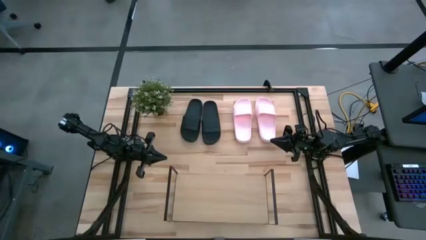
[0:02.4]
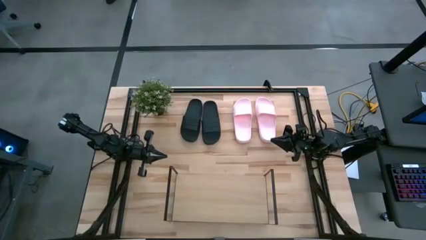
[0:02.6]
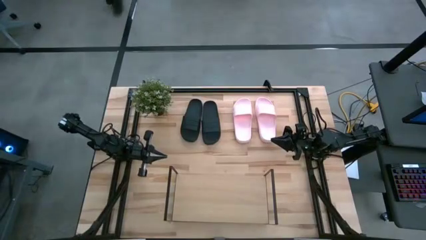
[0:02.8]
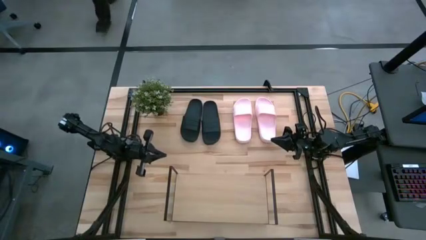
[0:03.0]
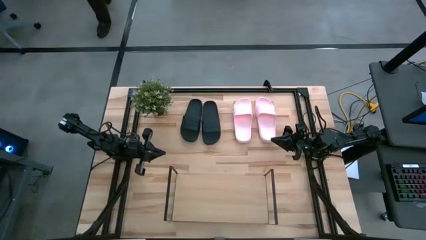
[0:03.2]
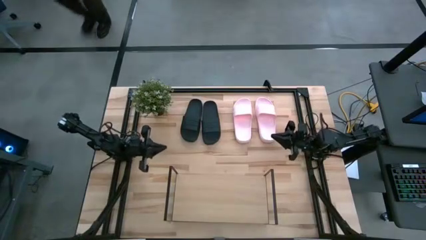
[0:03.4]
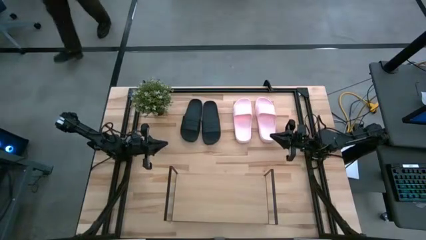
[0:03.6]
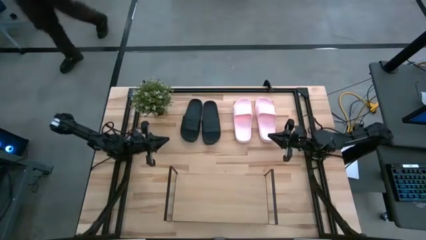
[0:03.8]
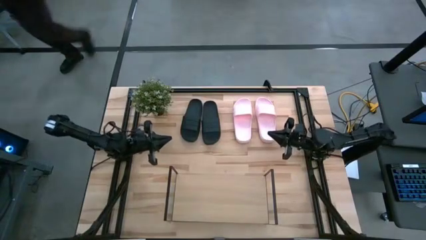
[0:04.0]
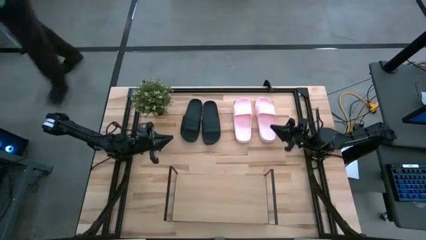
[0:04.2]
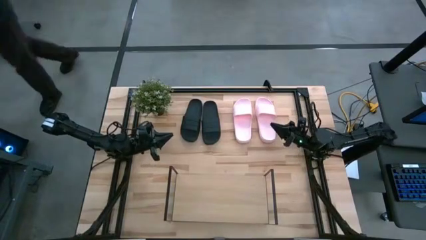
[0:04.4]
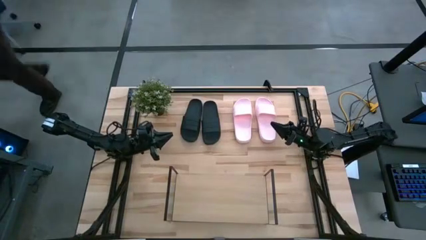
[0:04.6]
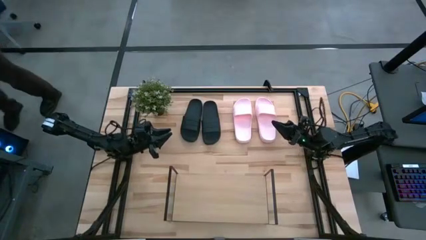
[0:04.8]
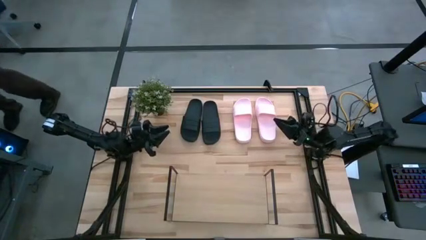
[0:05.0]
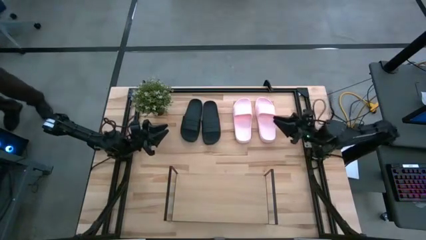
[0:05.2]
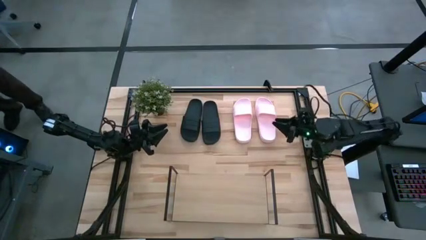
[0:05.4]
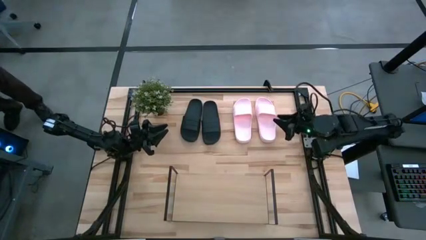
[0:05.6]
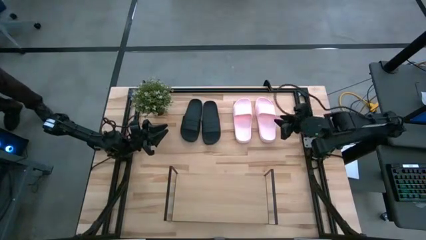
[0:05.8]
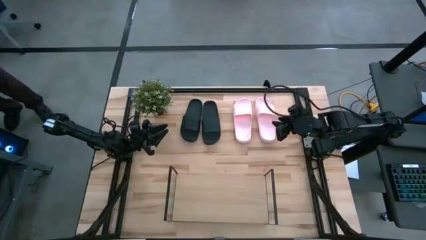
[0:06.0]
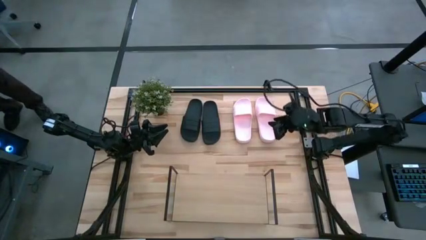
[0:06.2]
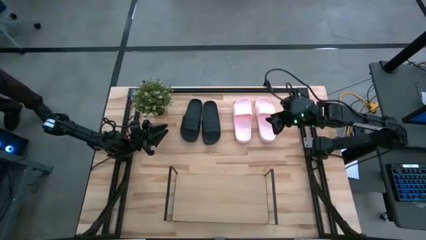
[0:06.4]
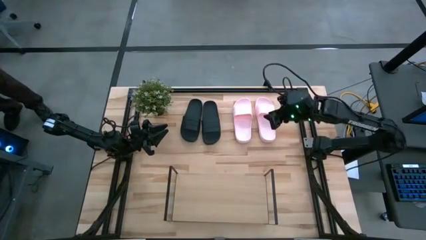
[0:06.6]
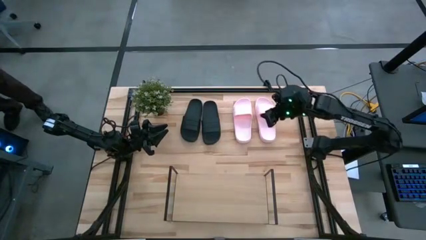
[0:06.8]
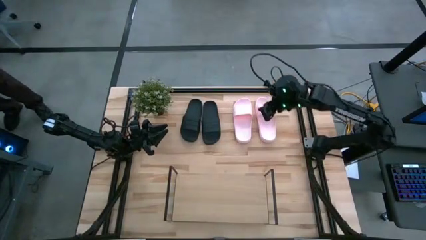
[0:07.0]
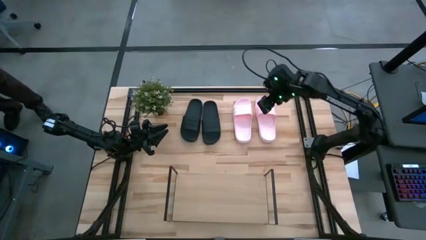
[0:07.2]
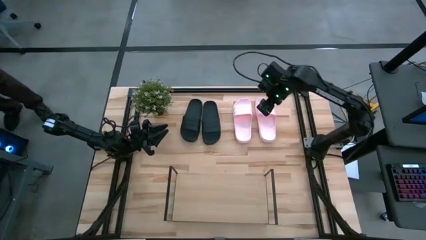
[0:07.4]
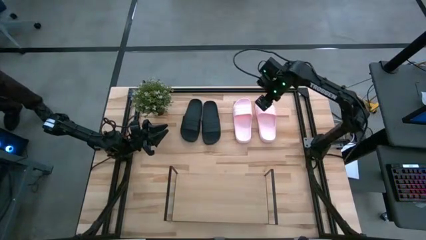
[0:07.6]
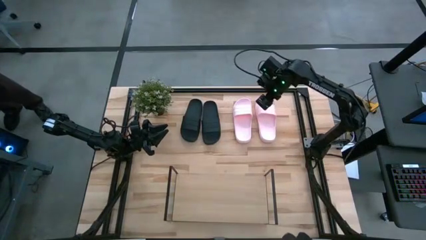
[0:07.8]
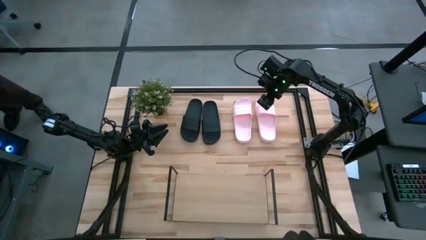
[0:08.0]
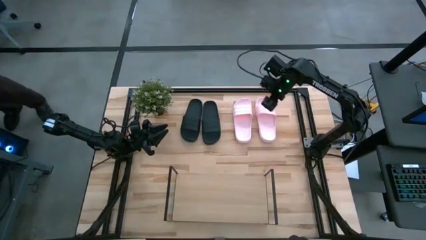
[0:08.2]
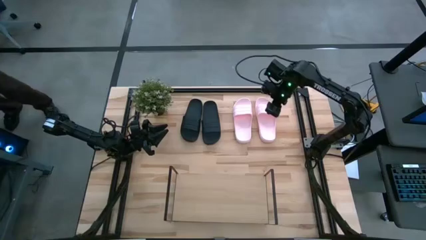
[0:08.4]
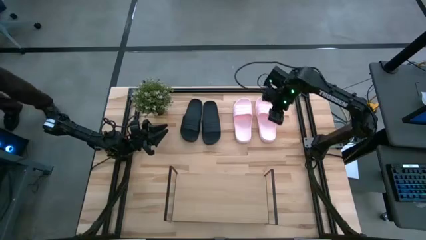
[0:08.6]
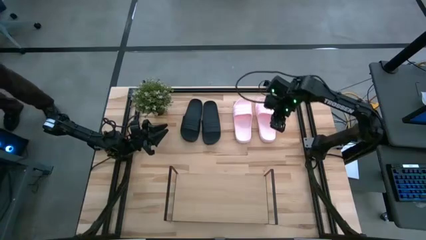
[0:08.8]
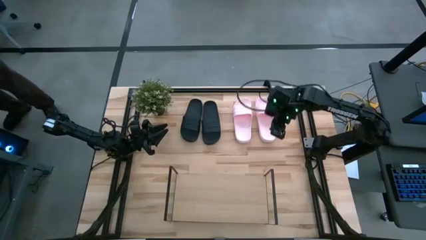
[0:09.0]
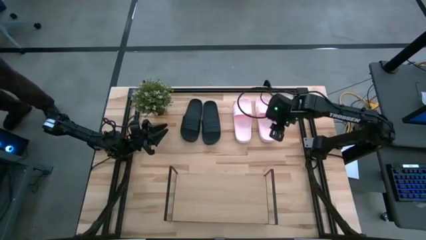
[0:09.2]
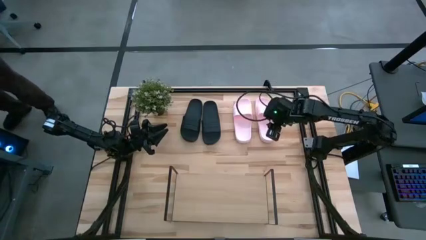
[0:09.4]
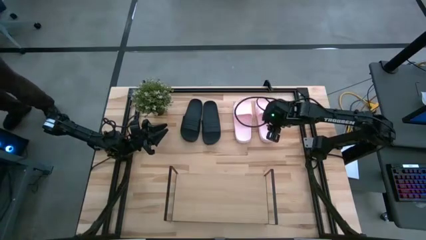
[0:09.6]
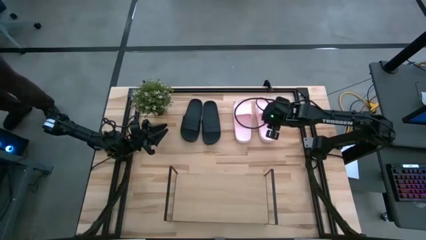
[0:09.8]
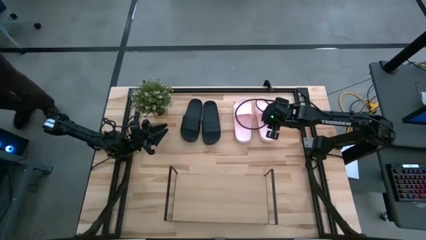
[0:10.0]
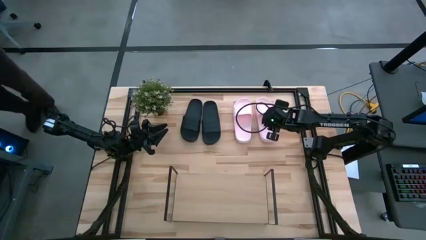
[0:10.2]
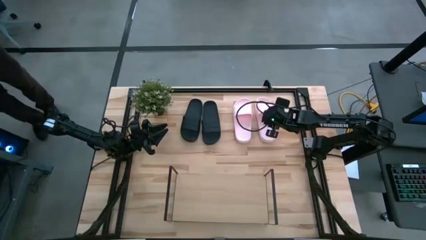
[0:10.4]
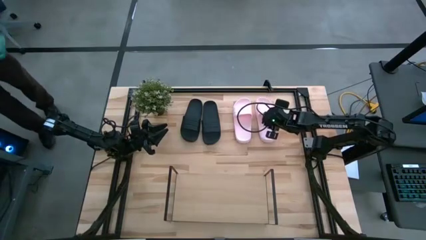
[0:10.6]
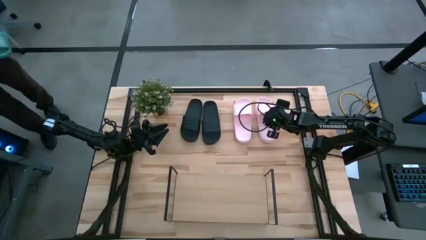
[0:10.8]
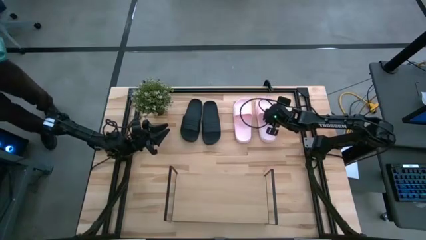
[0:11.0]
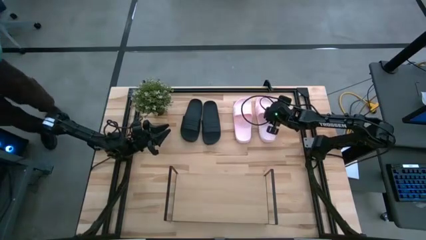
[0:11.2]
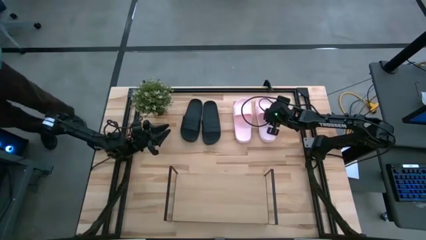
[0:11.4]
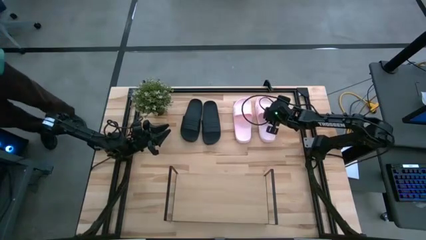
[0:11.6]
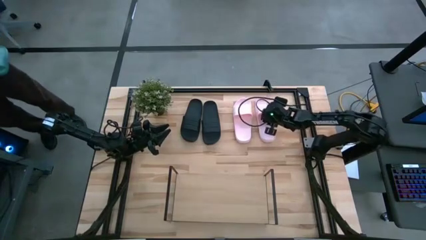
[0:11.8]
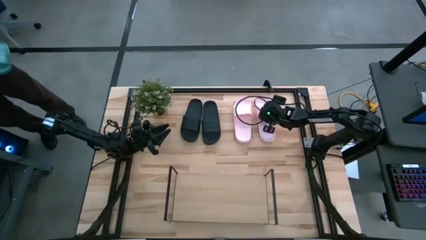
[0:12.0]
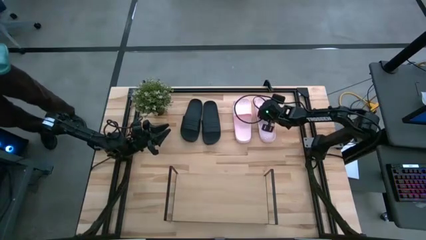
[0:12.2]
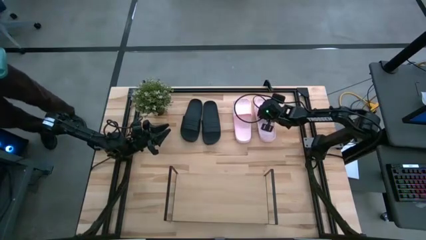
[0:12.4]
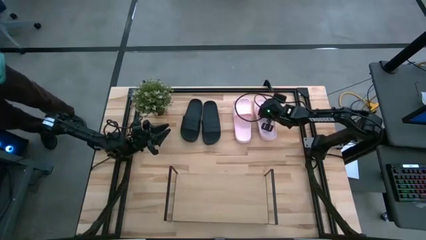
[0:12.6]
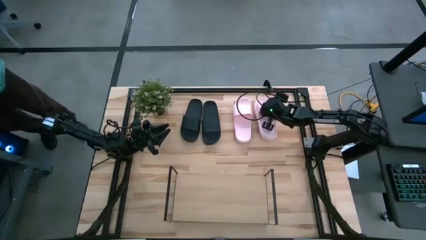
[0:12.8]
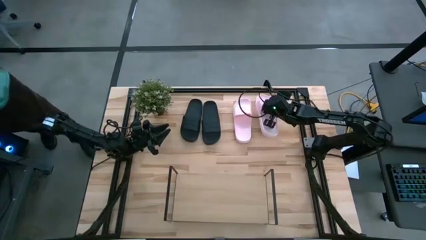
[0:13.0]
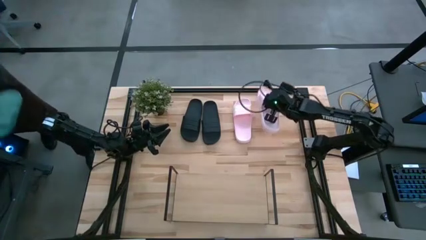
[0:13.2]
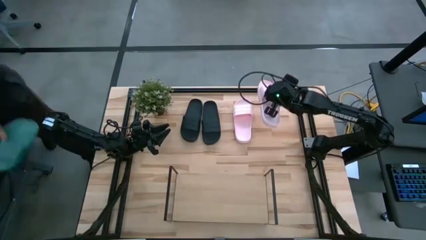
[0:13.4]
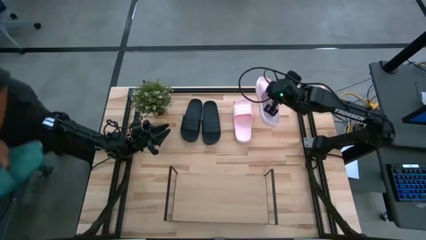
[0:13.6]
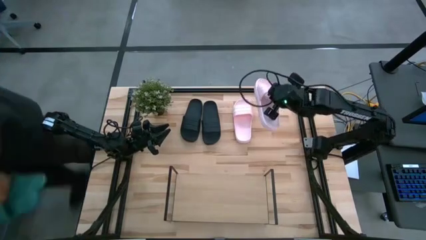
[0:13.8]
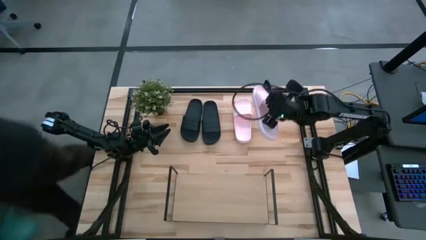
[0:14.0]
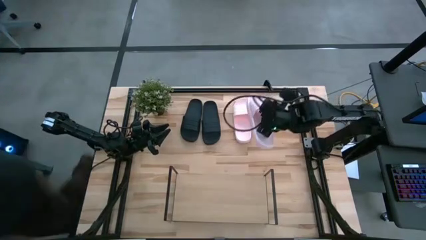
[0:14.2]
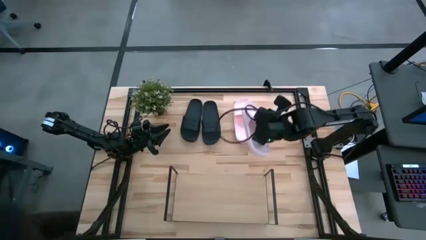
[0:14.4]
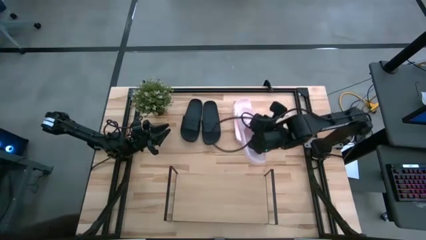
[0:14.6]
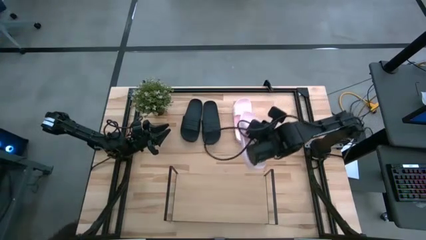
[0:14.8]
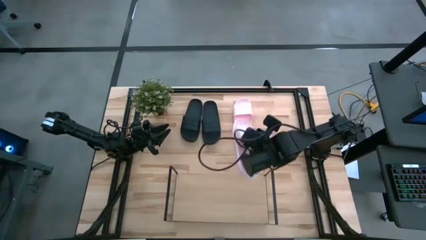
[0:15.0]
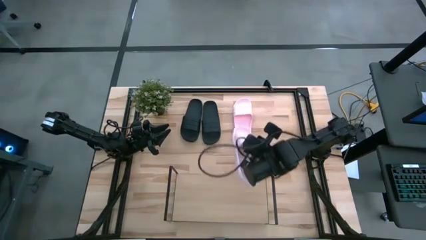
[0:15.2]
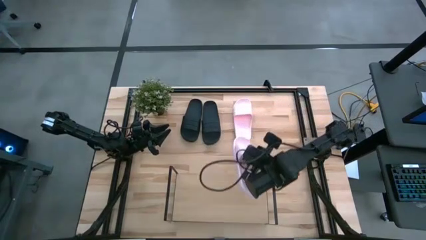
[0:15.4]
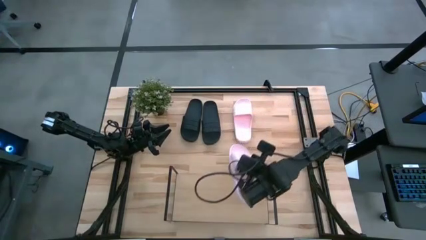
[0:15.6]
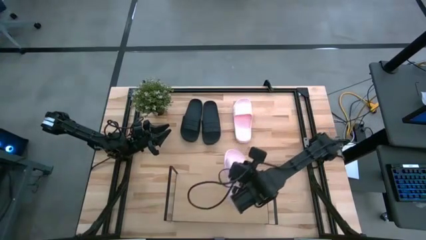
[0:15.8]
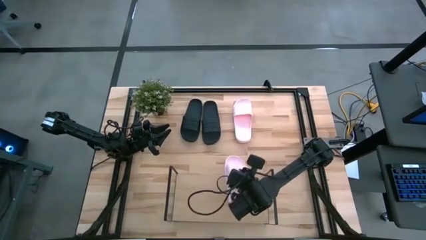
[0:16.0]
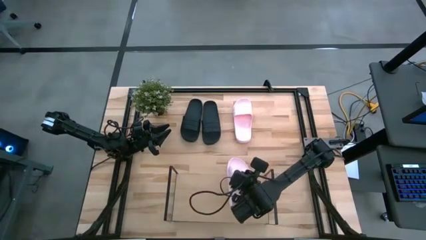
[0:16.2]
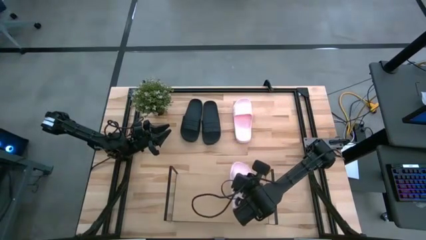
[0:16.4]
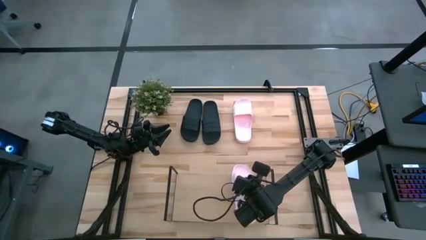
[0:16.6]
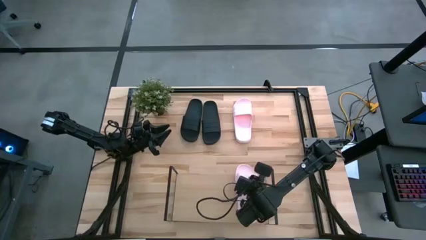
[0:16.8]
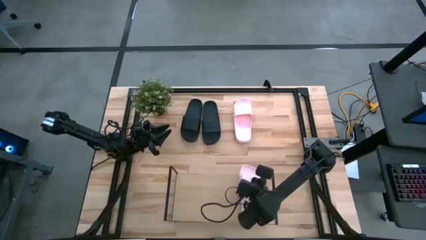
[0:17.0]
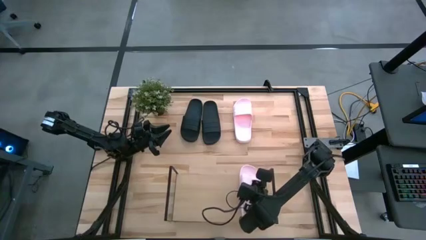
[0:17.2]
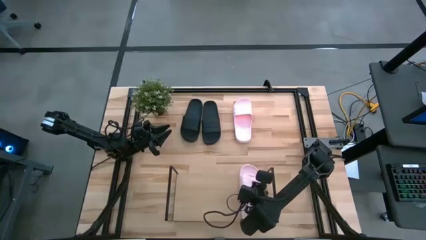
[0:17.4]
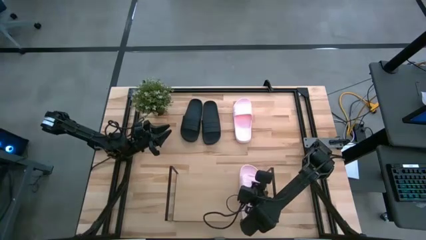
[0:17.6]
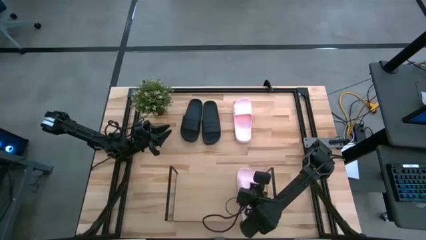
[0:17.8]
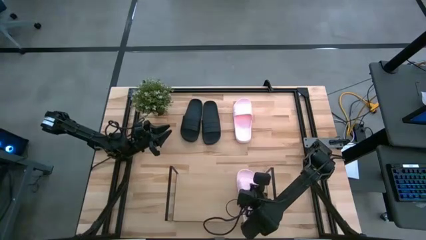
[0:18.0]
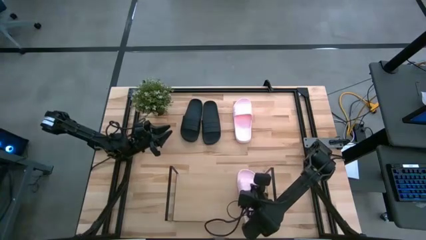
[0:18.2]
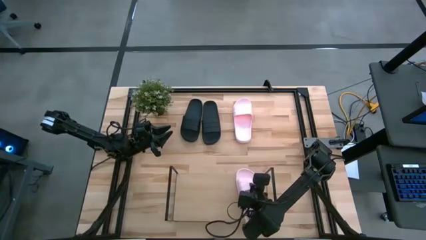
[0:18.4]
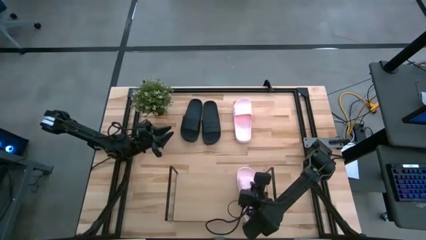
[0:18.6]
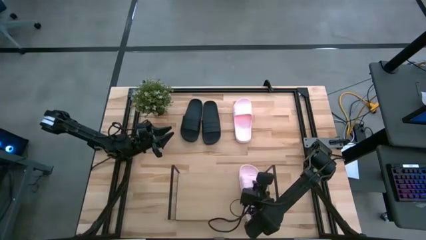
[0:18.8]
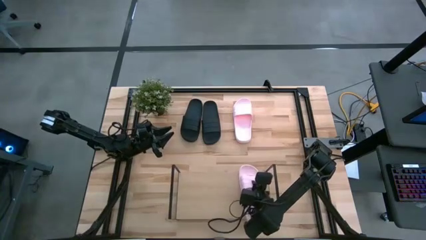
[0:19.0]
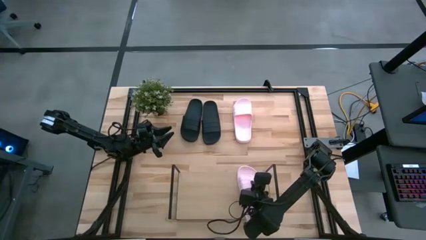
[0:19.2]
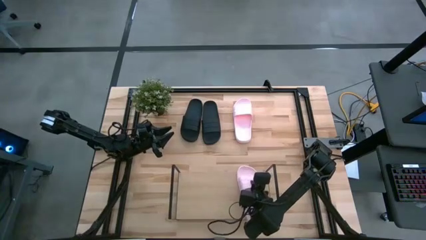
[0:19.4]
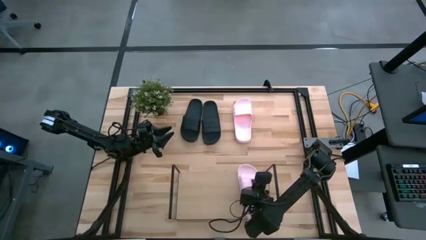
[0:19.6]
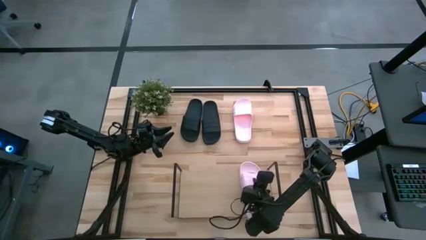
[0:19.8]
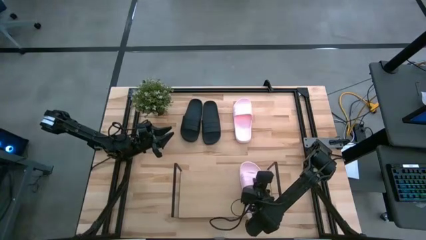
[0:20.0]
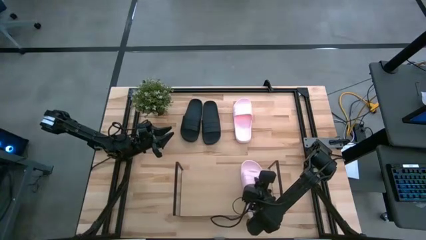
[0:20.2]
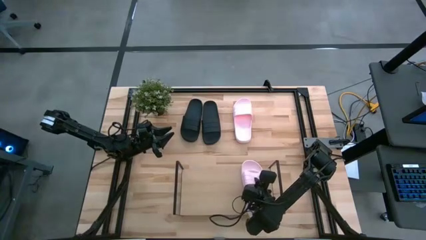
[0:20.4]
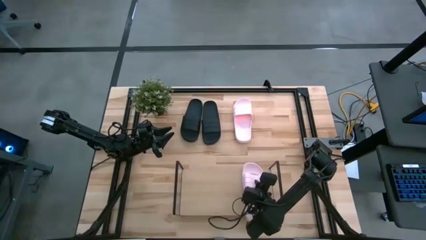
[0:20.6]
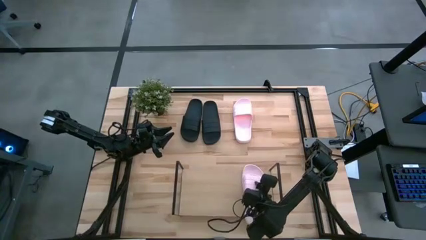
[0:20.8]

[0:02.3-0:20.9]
Task: Pick and place slides into the shelf
Put the right pink slide on the shelf
